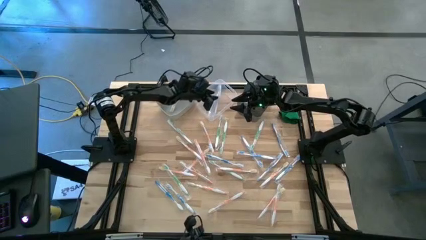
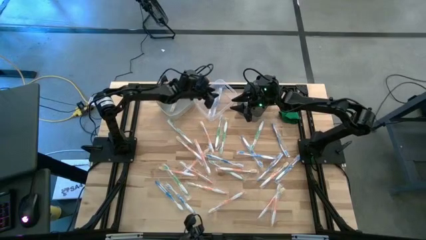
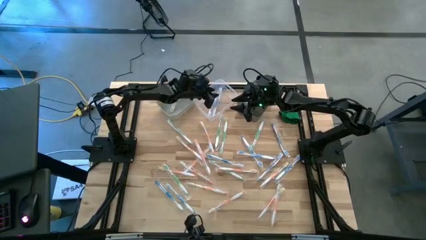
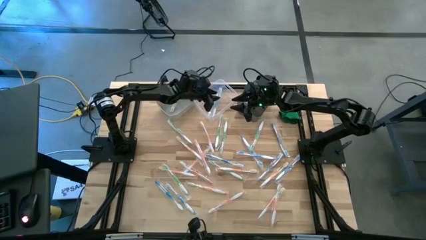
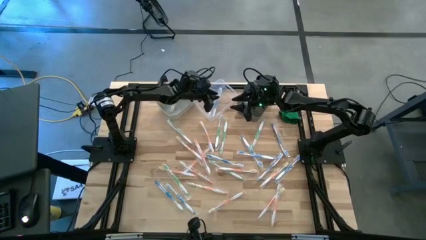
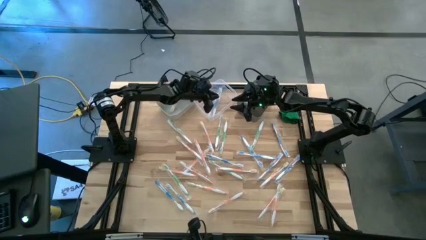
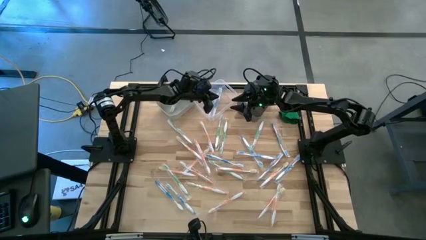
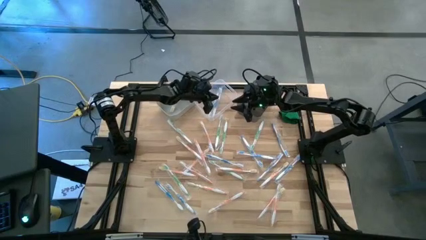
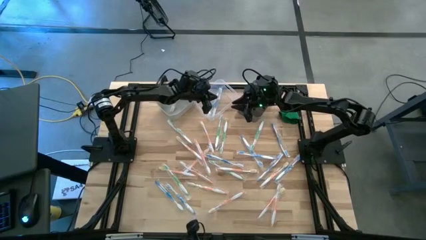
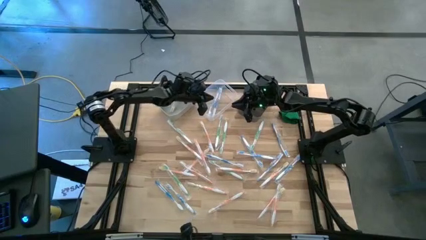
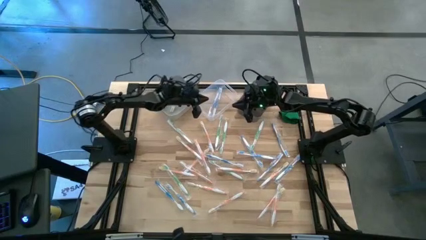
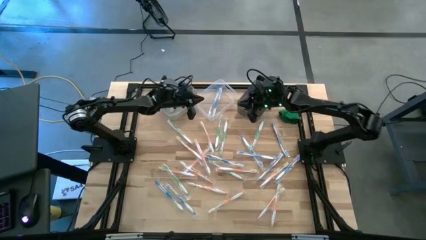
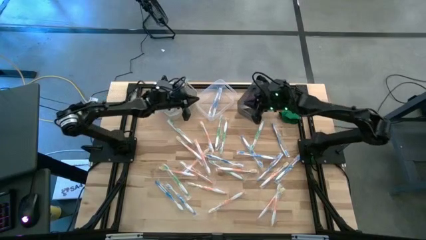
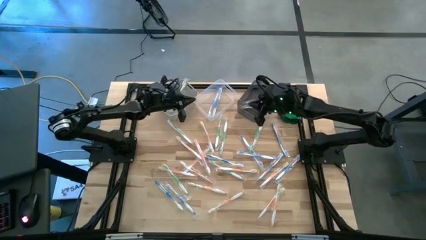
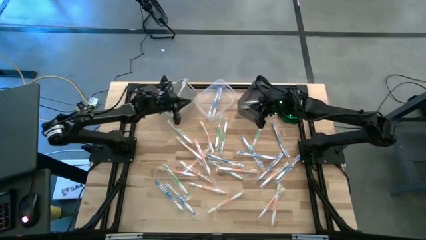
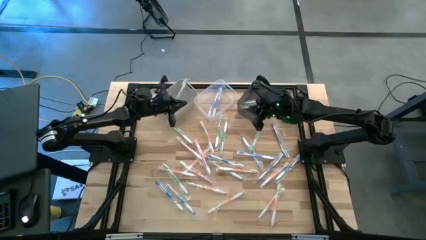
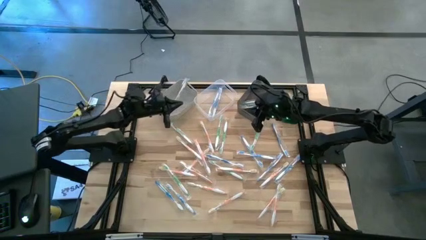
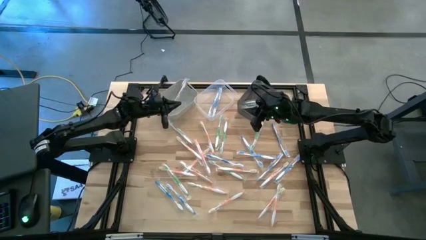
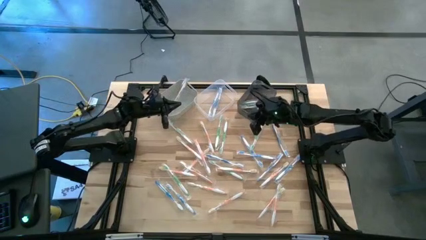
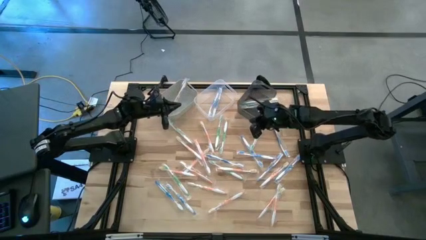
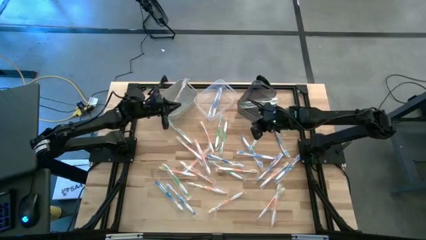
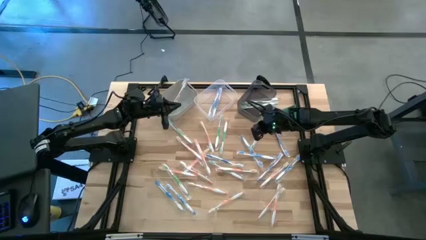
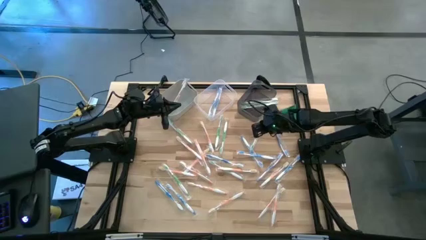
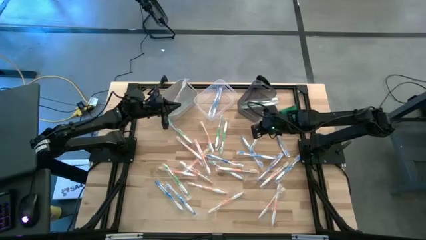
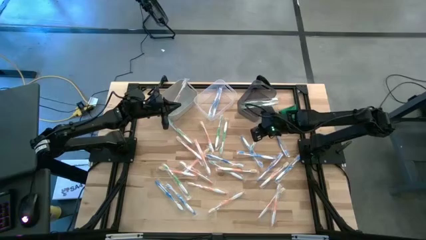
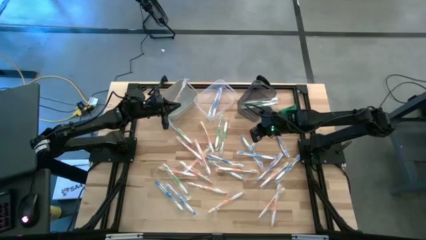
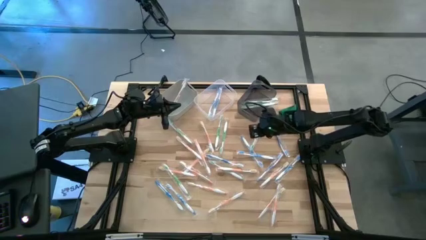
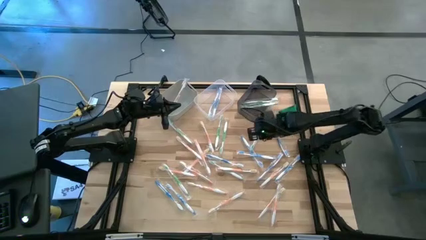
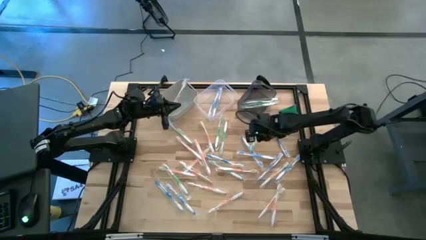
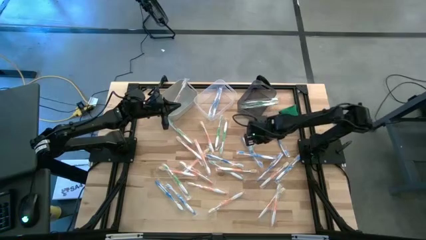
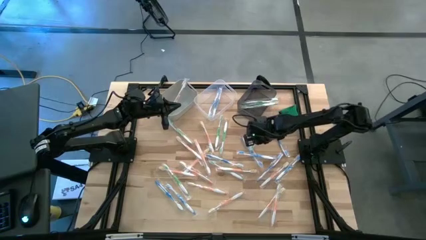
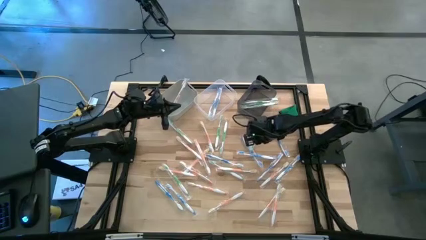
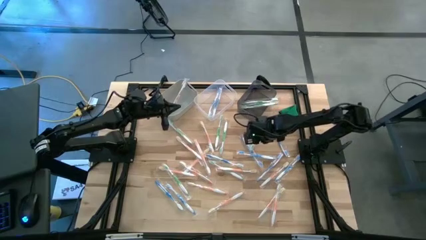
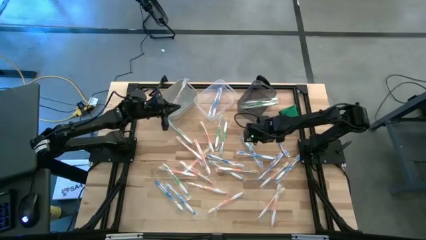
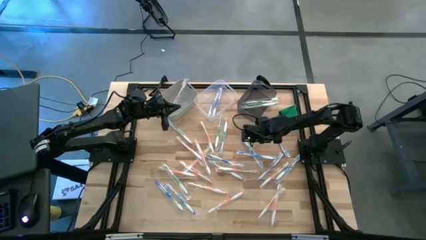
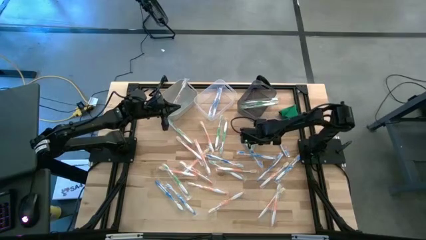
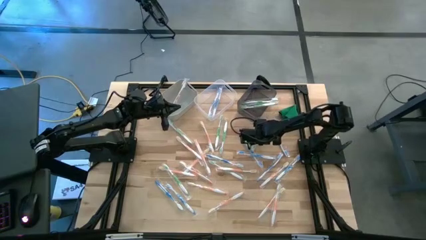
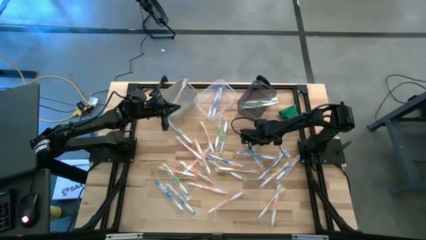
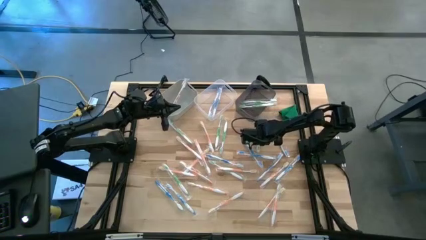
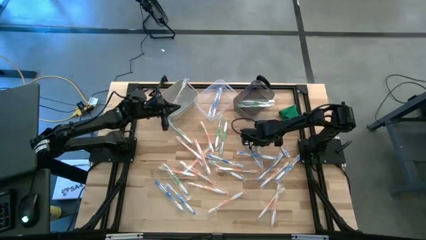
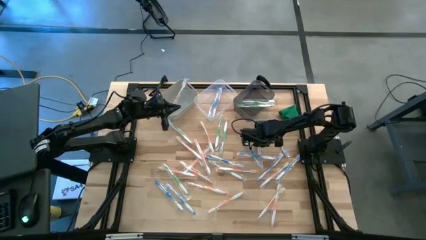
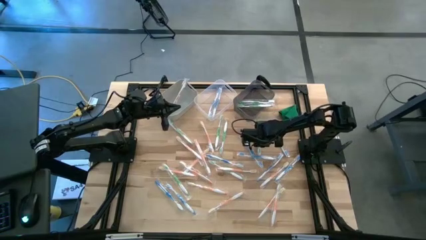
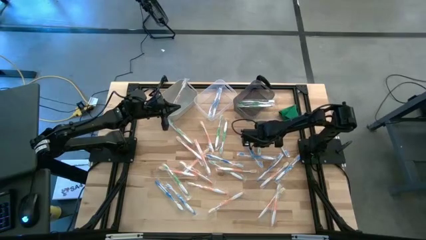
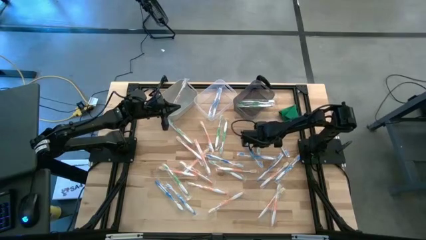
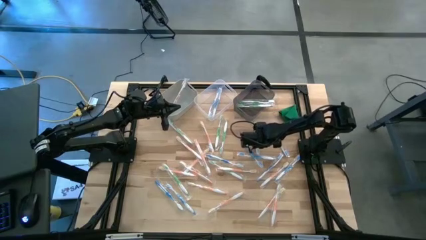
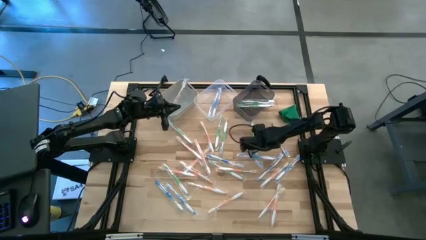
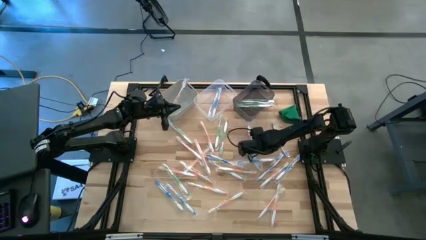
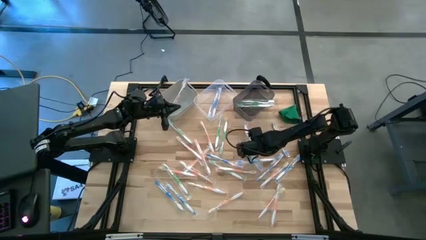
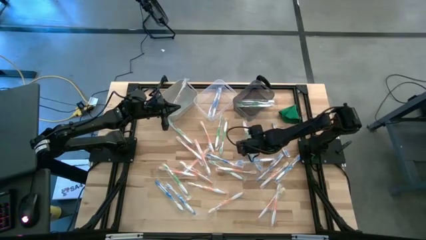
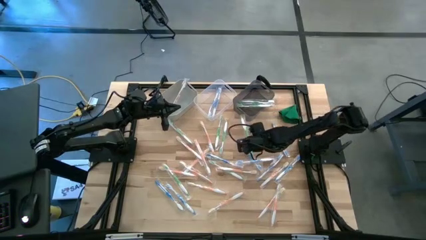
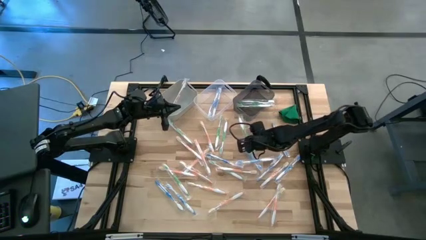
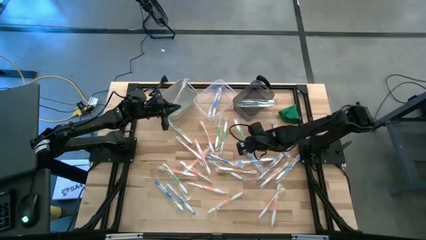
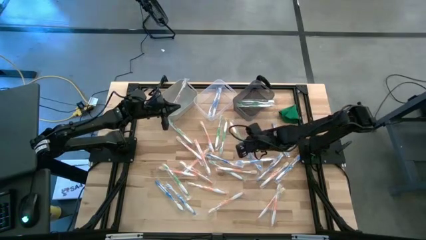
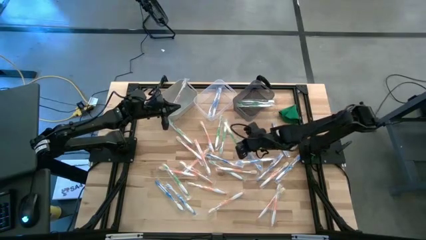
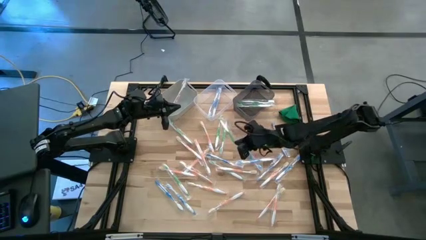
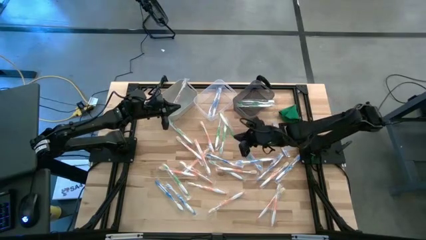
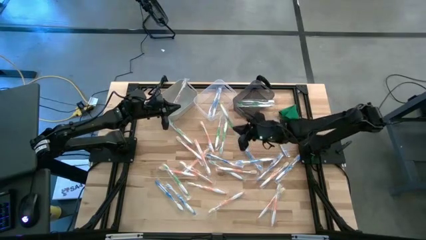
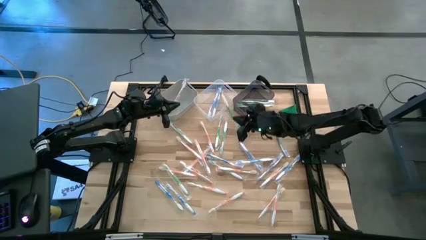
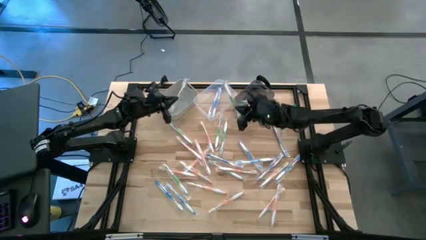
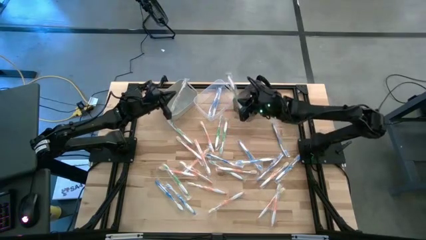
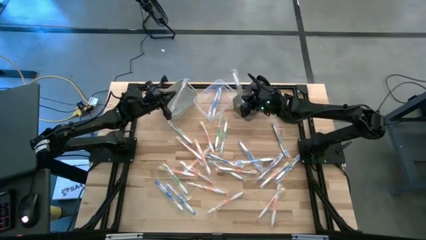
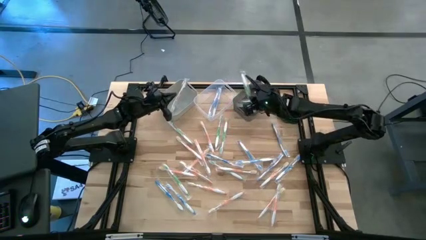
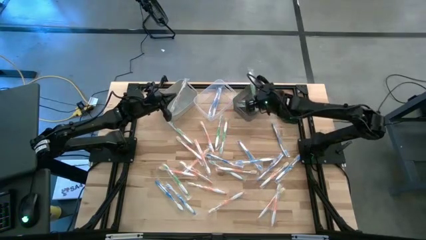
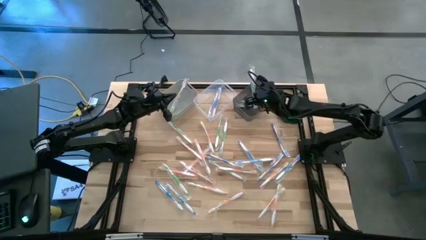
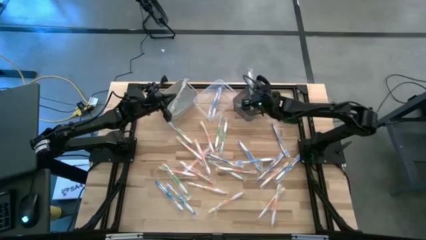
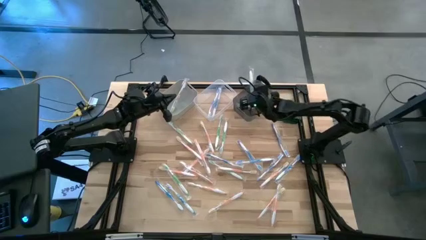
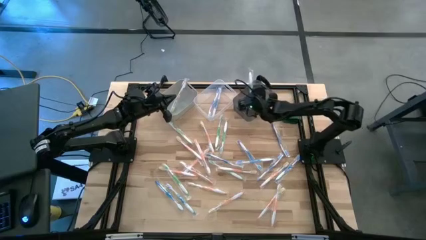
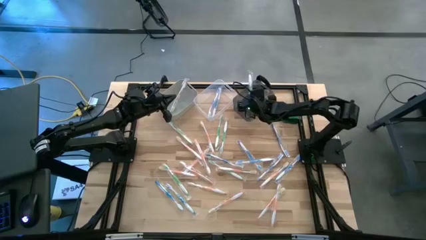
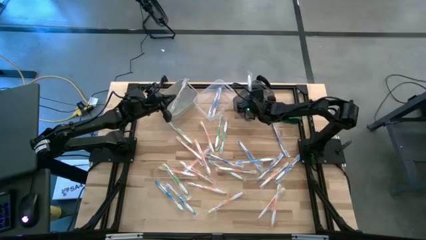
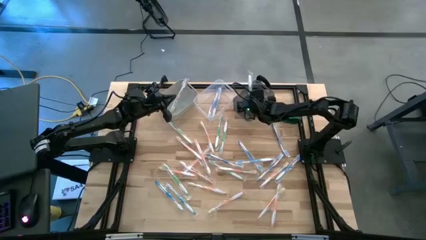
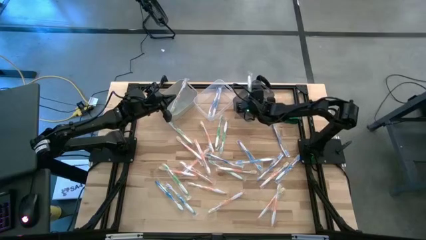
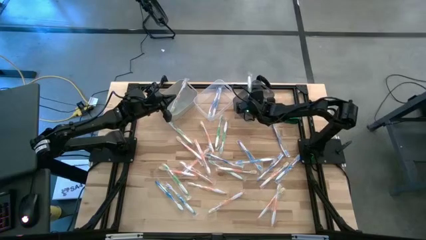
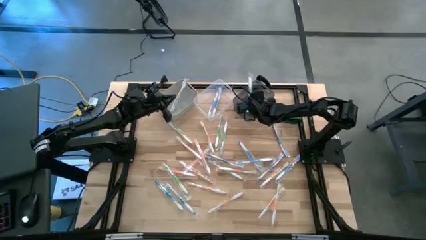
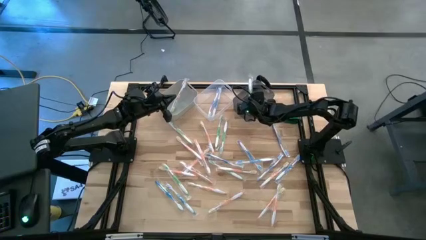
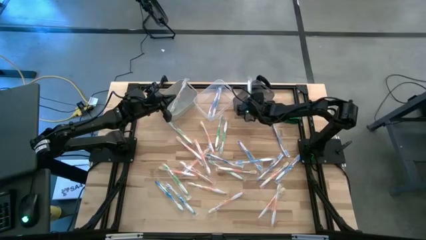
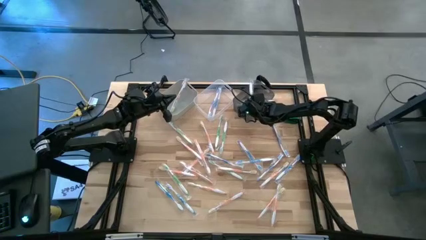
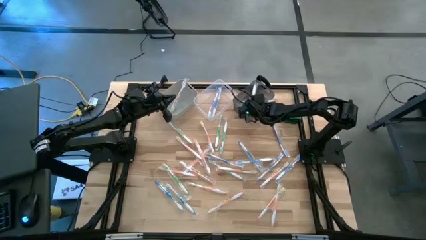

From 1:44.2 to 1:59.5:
Task: Pick & Place Toothbrushes
Put the green toothbrush into the black bin

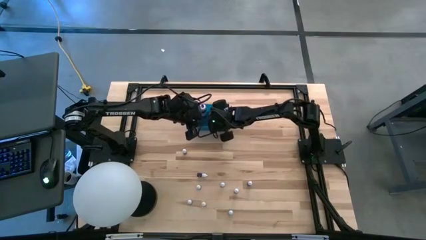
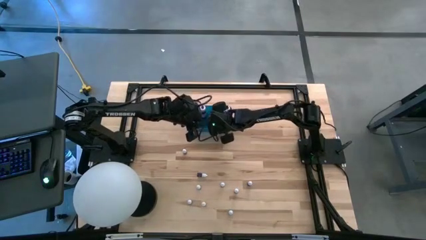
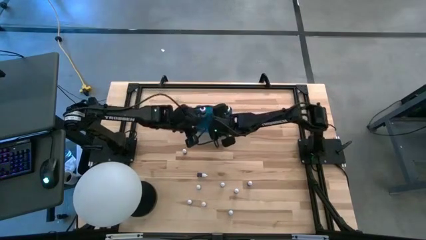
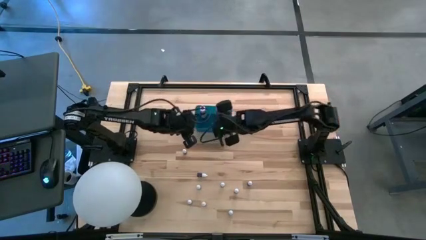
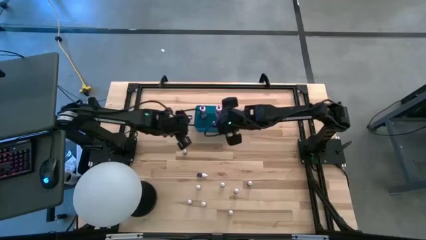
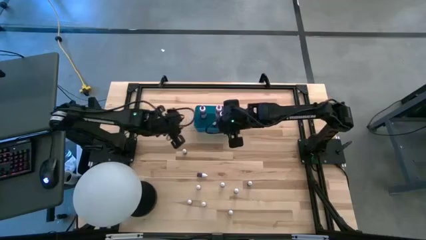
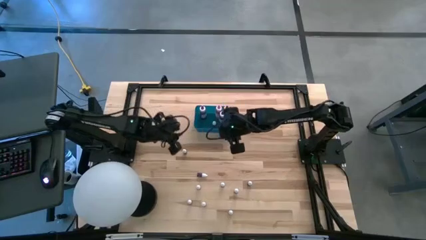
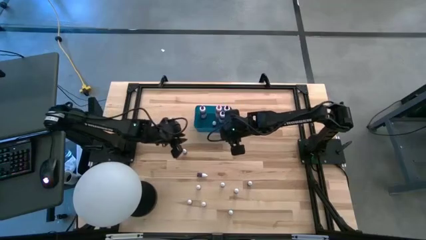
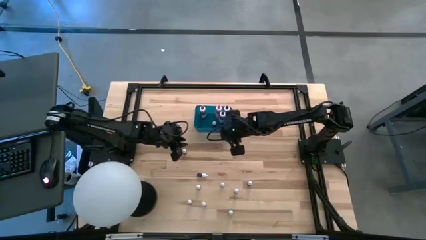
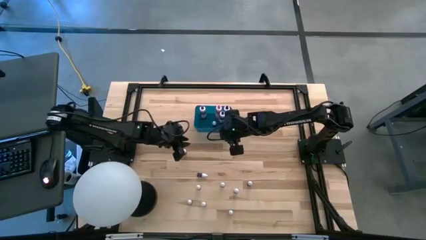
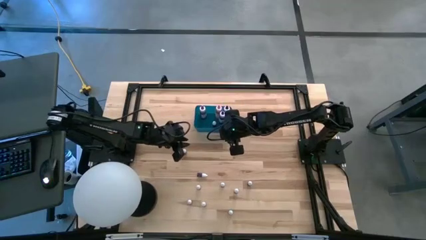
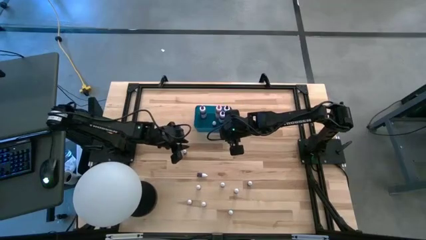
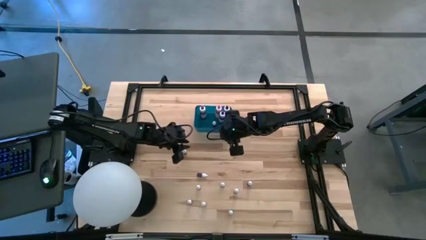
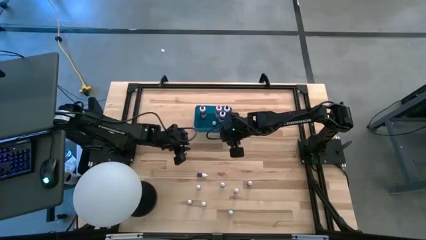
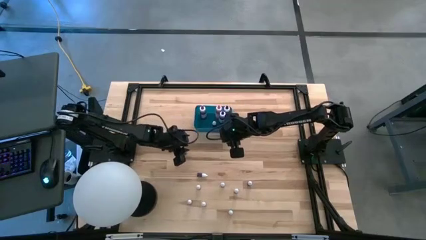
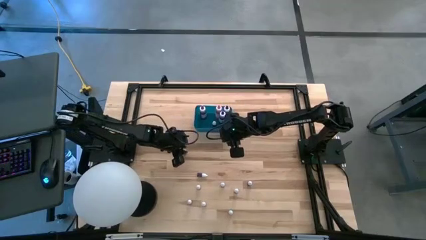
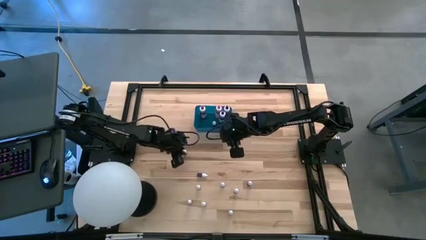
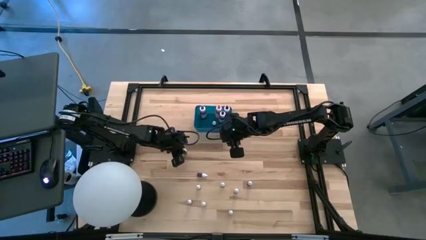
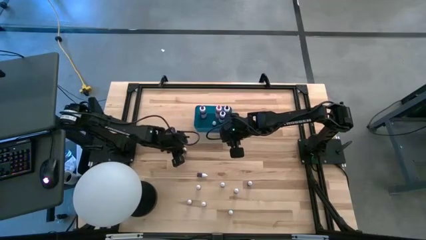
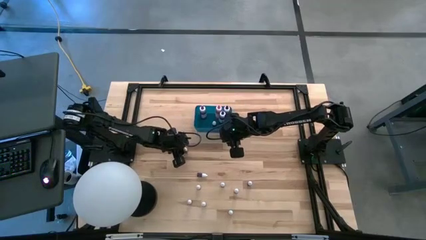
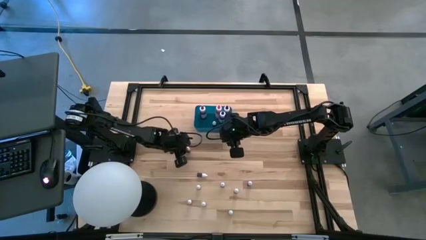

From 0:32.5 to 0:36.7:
Task: Pick & Place food coloring
Put the blue food coloring into the blue bin
